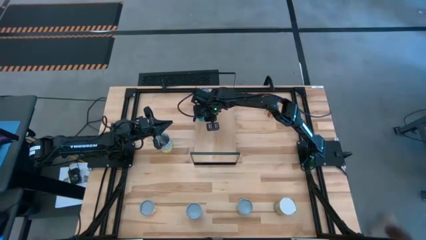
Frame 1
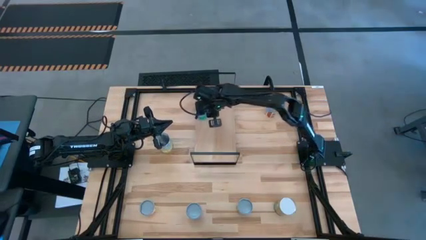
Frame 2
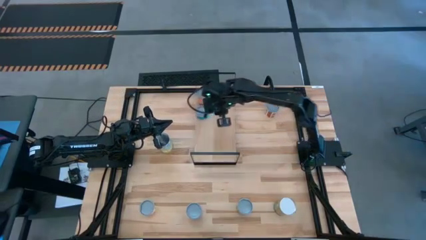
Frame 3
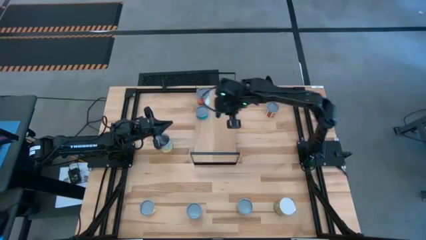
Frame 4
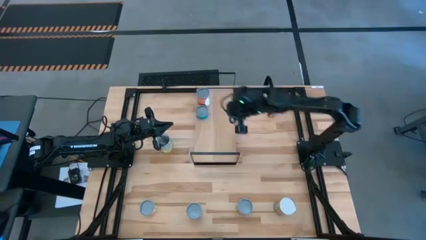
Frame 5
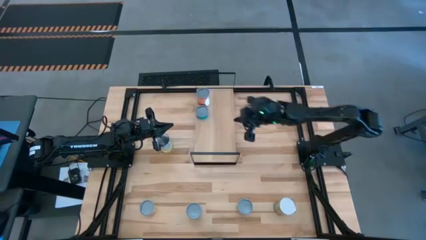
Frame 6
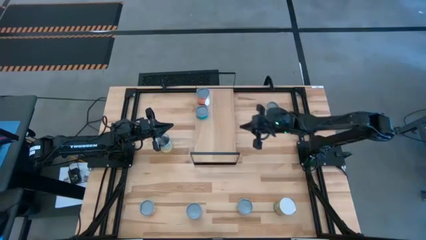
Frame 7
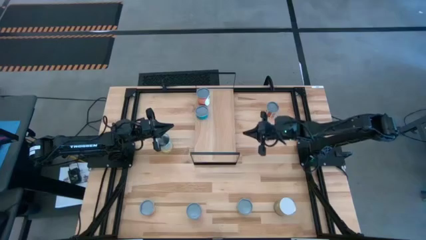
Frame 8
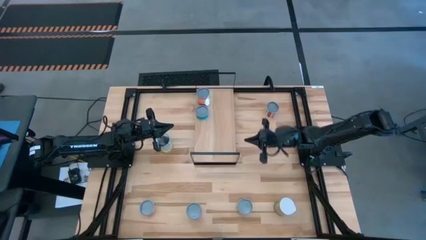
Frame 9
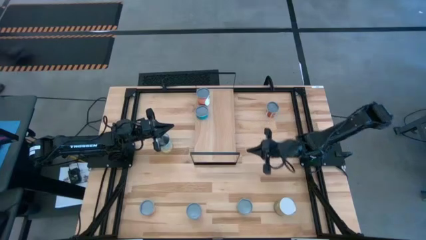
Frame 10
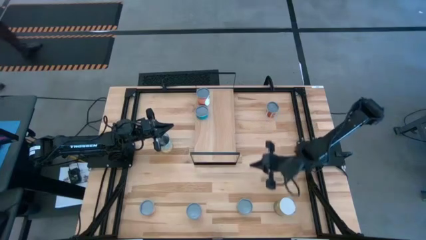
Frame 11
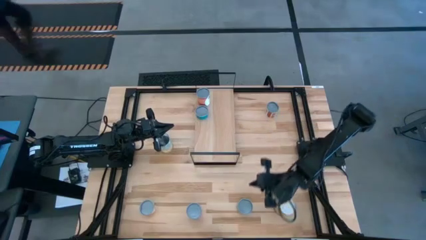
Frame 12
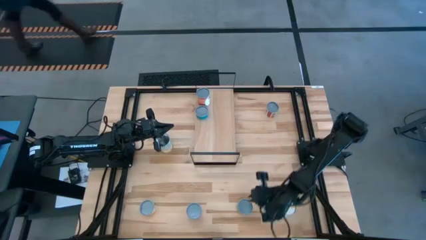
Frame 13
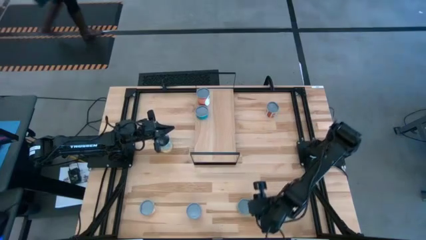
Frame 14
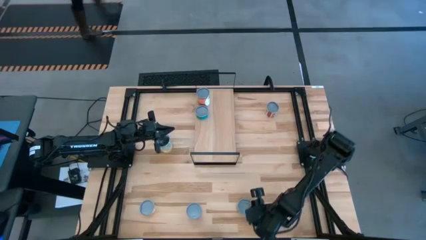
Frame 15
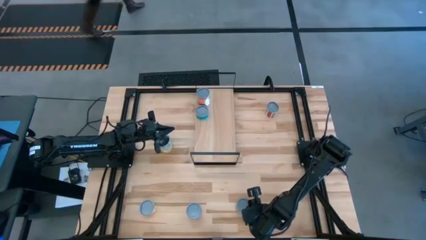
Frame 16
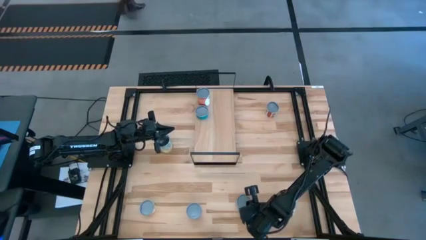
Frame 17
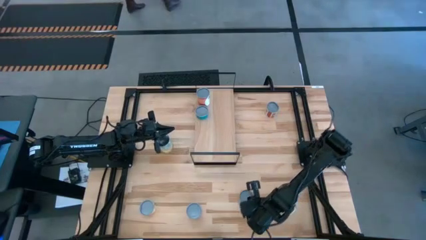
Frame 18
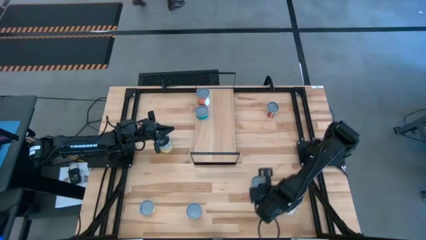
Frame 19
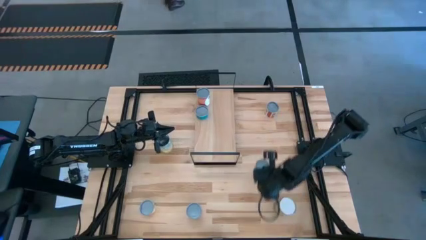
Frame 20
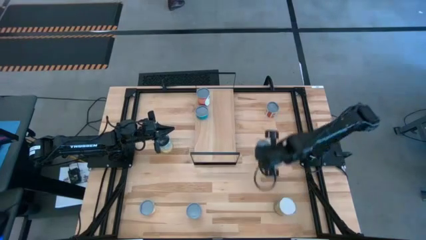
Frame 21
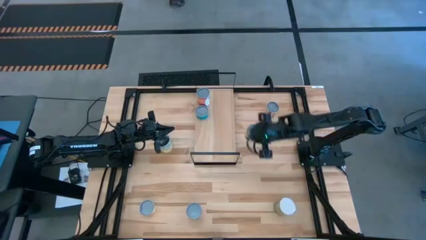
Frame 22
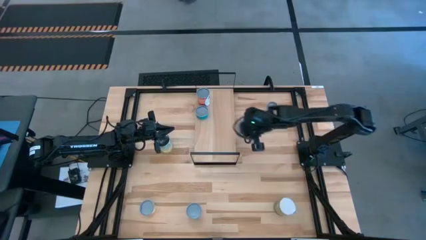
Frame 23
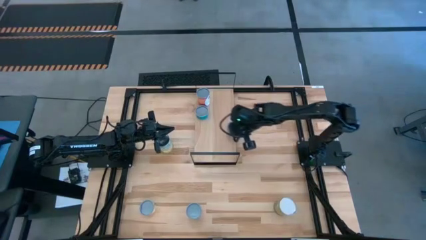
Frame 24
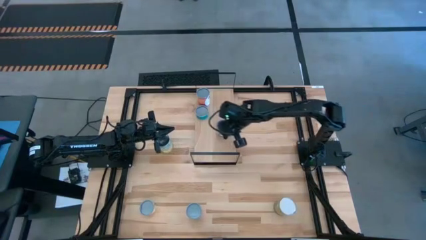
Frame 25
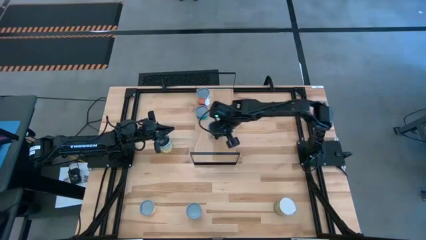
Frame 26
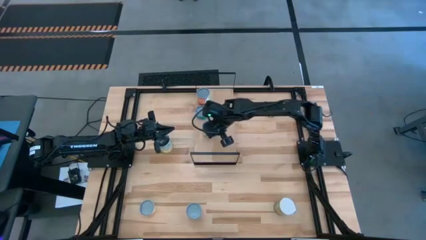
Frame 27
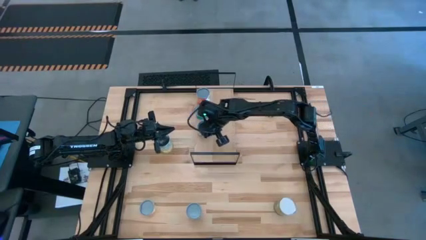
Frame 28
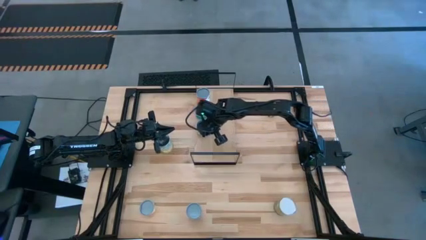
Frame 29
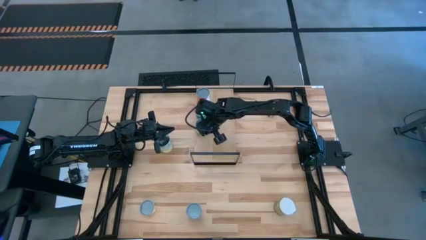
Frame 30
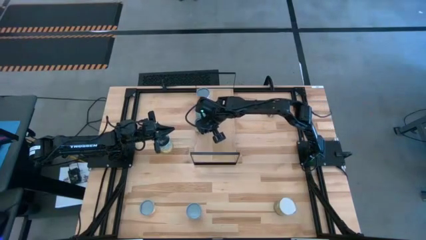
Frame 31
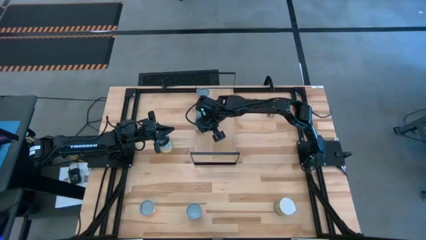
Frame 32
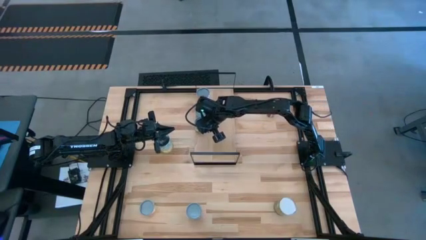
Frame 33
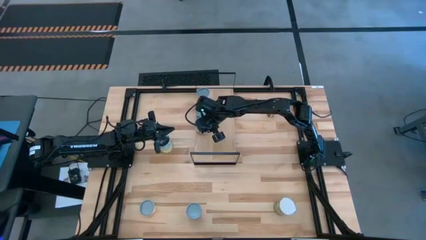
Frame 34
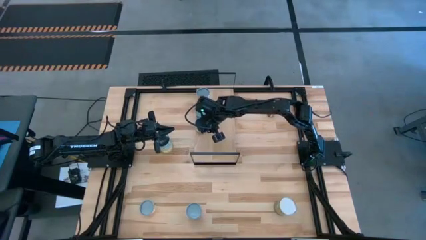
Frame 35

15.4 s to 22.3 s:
Task: Pick and place cans onto a shelf
Put the medium canned peaches on the shelf

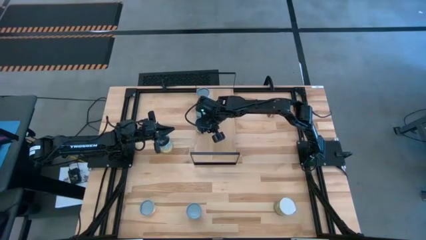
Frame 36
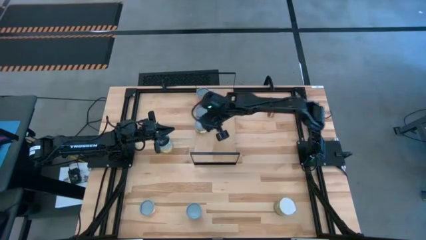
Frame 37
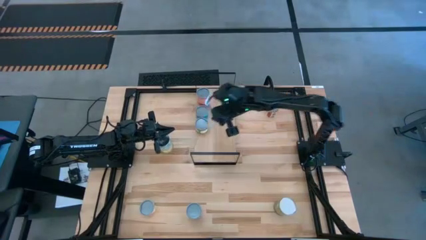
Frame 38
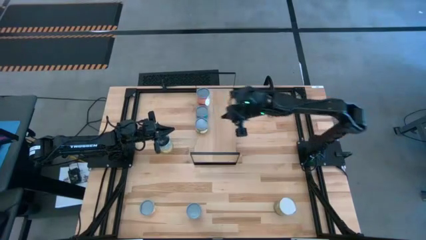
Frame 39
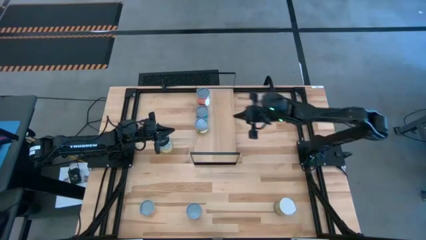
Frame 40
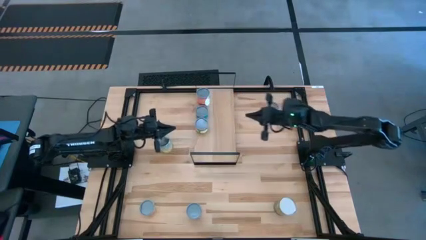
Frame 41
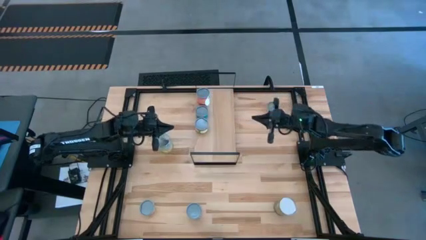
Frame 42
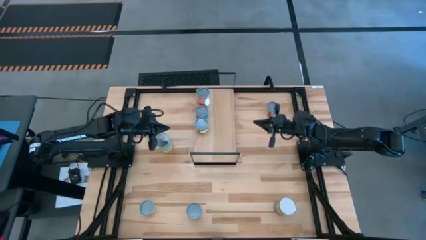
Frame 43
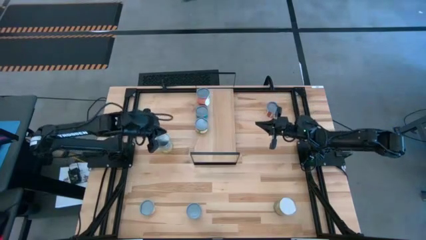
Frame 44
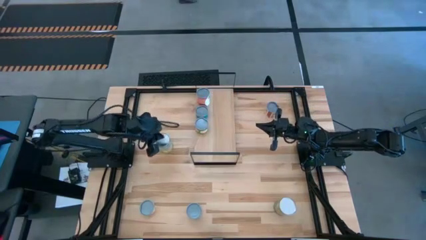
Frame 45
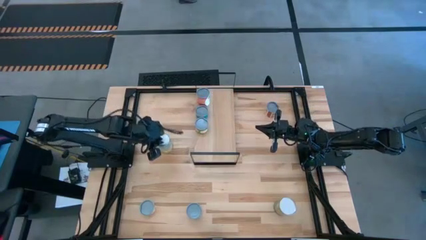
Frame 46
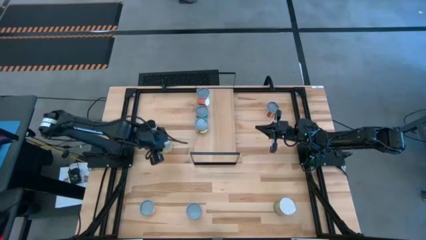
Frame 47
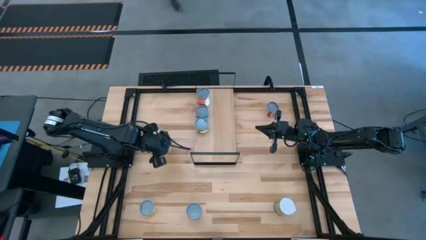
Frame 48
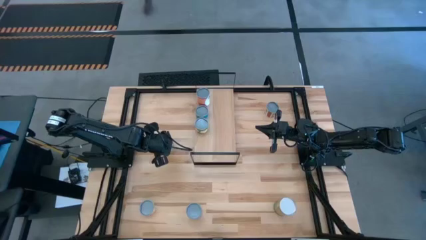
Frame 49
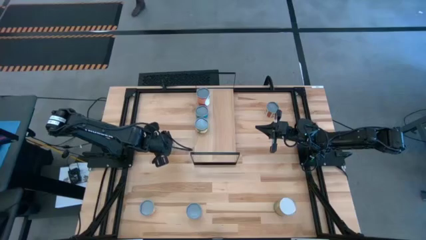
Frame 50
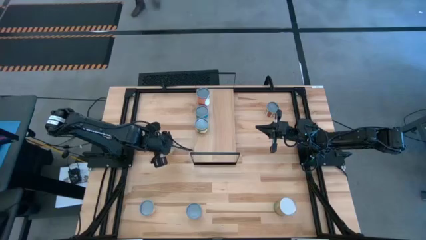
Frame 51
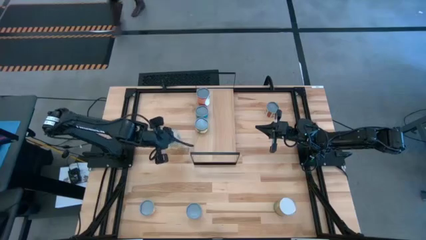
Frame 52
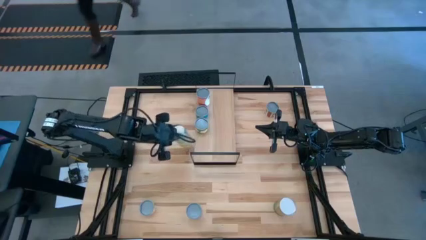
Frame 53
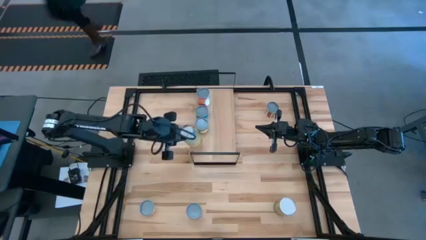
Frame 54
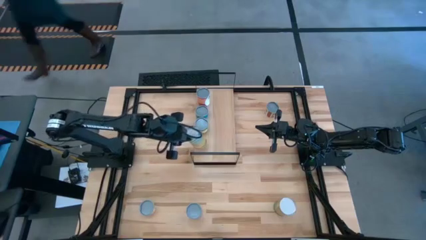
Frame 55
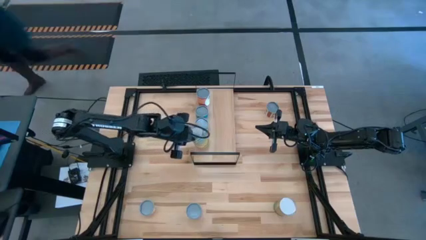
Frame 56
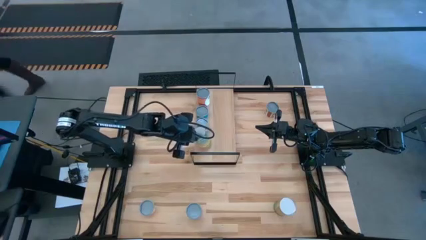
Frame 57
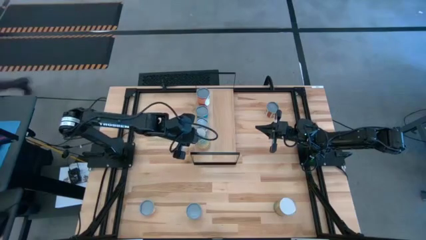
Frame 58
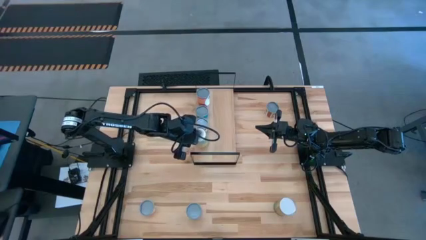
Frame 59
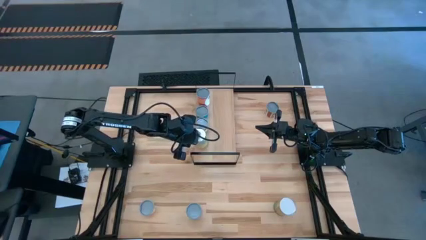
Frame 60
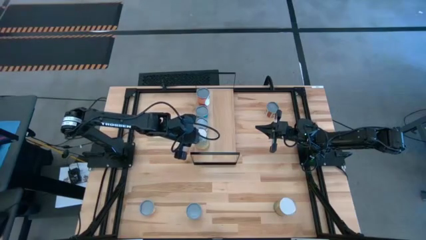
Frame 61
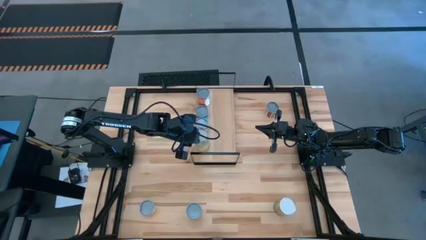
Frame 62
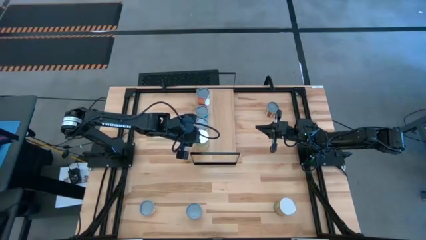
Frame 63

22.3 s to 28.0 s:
Put the large canned carrots on the shelf

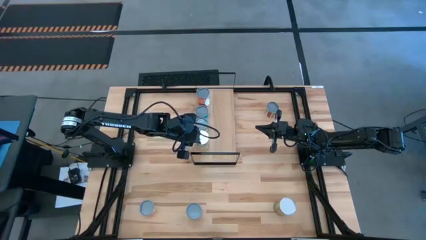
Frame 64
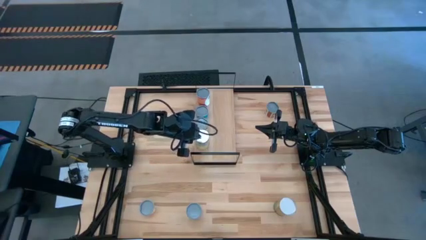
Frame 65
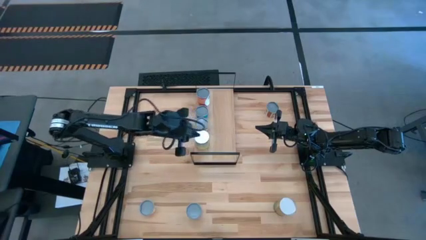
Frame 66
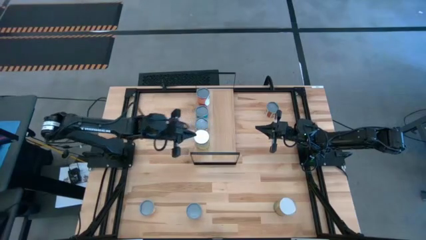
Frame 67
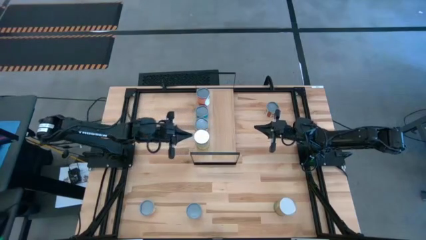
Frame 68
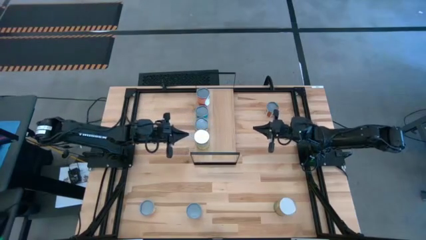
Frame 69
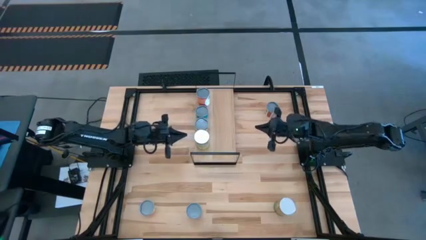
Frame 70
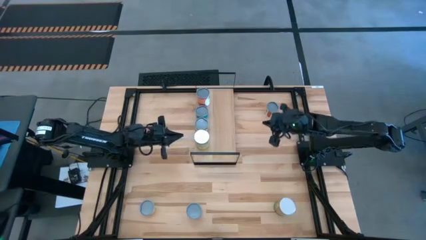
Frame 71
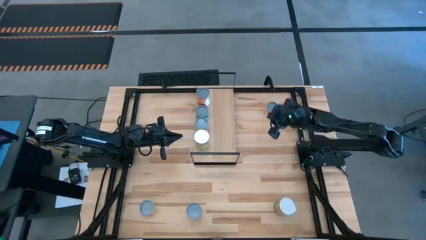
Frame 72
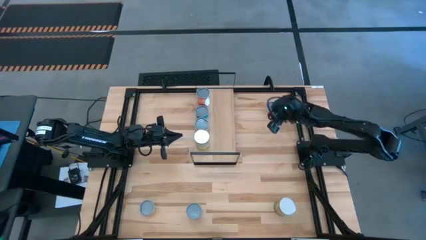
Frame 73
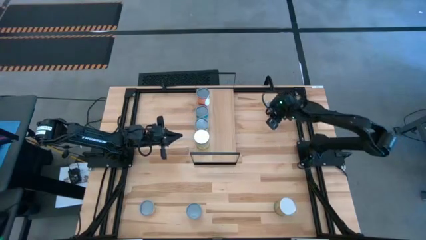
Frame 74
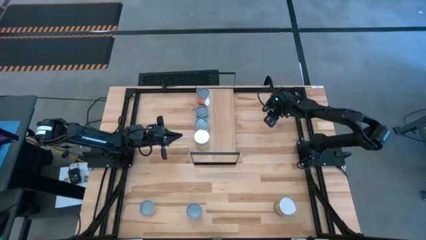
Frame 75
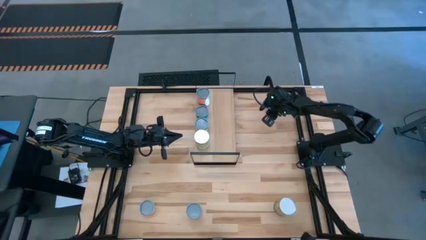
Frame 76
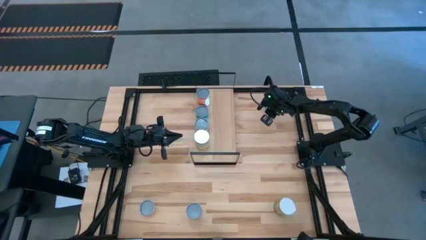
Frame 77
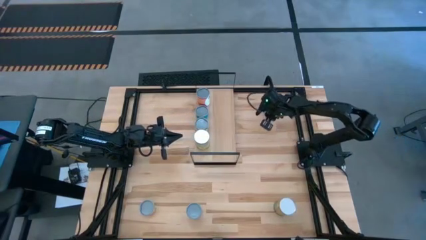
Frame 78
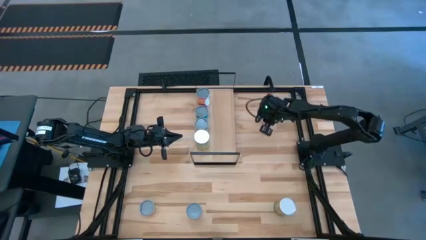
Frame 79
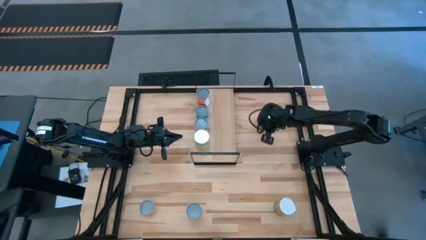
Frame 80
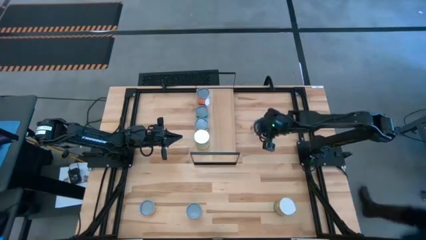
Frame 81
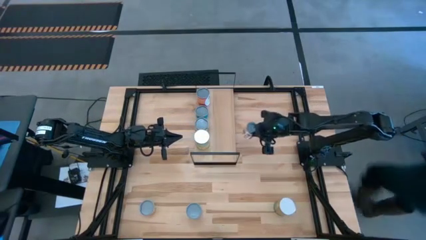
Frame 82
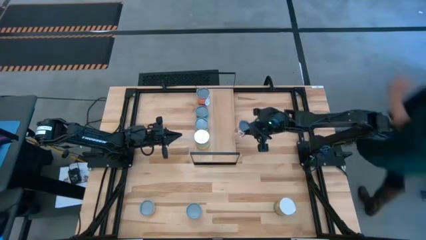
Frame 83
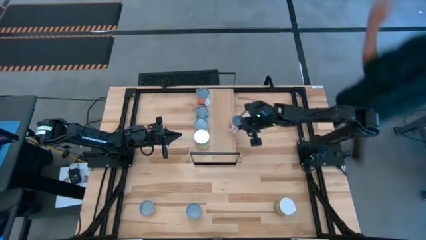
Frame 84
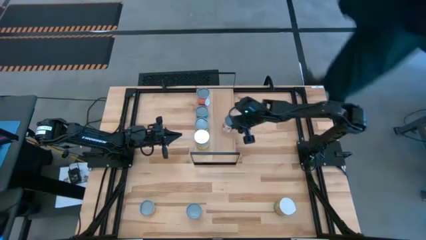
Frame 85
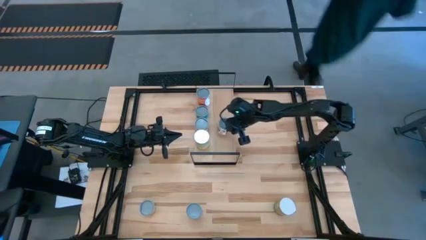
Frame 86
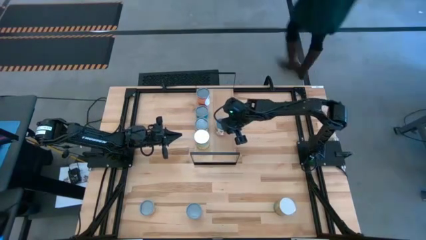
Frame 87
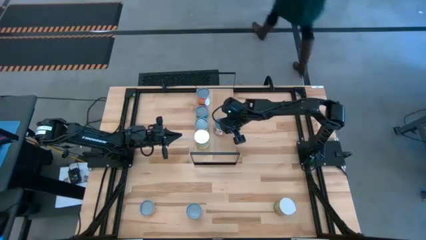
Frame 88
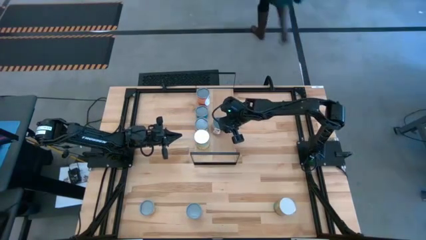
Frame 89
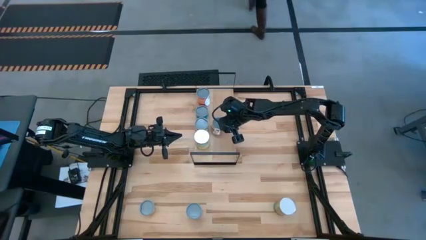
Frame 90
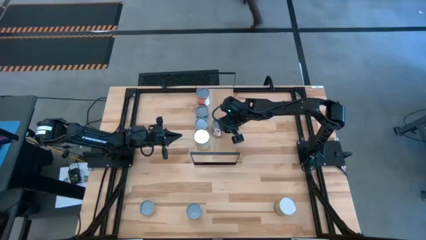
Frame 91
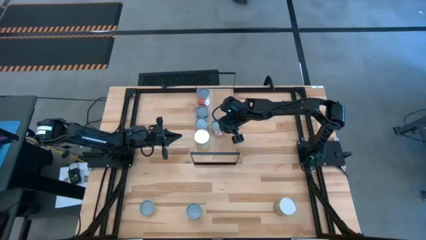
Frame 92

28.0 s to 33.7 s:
Put the medium canned diced tomatoes on the shelf aligned with the medium canned peaches
